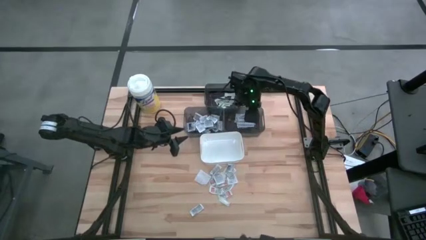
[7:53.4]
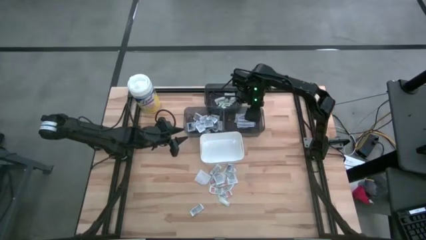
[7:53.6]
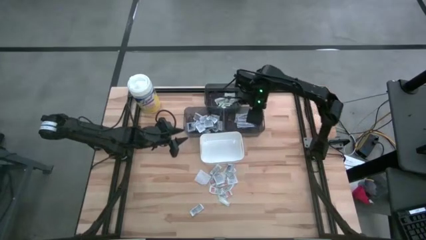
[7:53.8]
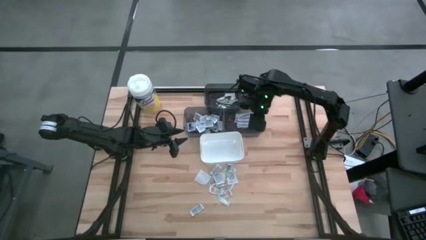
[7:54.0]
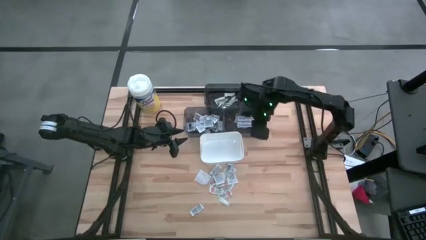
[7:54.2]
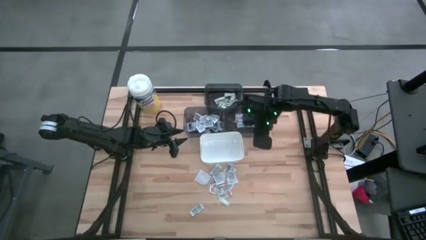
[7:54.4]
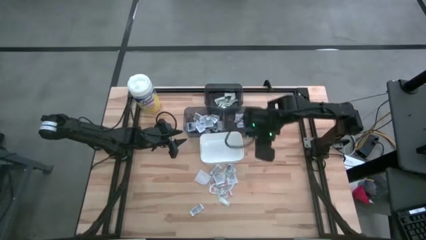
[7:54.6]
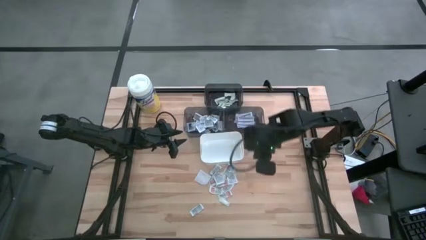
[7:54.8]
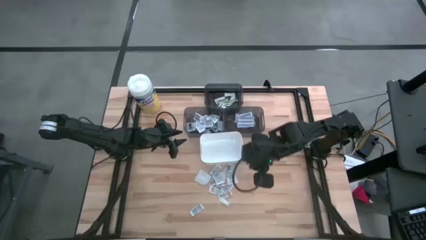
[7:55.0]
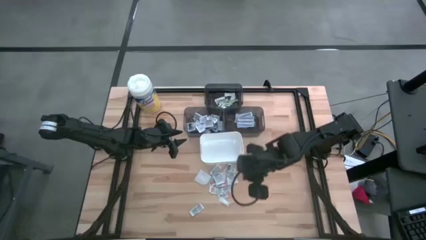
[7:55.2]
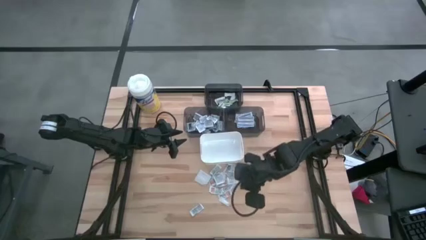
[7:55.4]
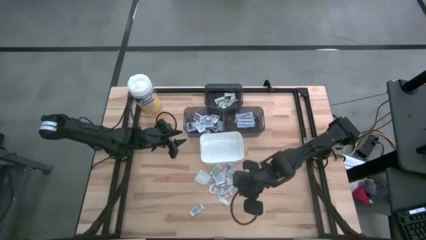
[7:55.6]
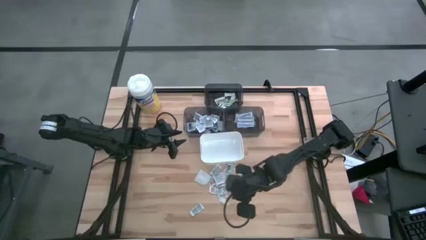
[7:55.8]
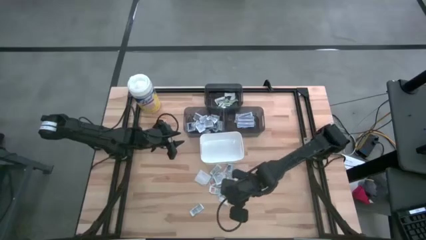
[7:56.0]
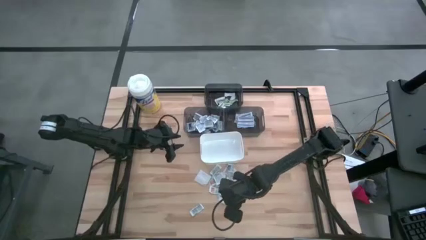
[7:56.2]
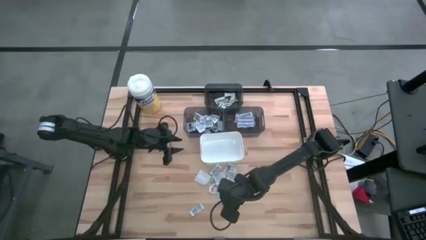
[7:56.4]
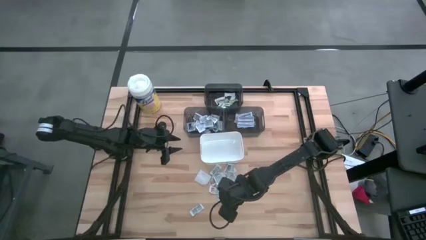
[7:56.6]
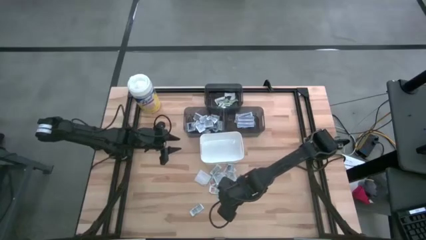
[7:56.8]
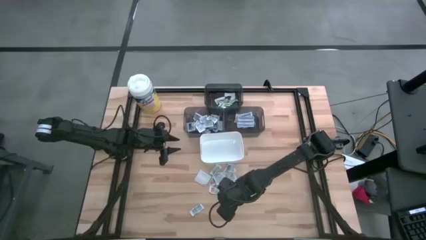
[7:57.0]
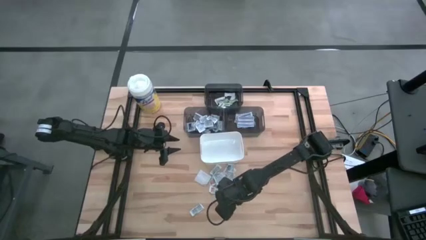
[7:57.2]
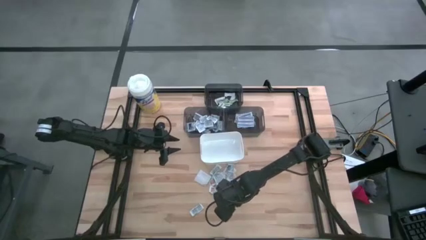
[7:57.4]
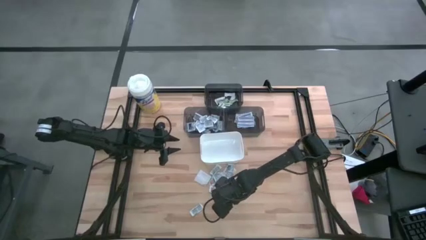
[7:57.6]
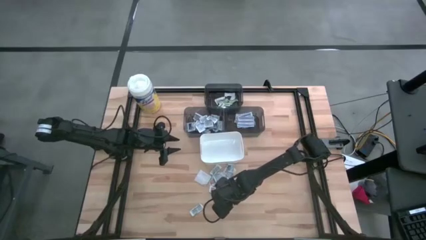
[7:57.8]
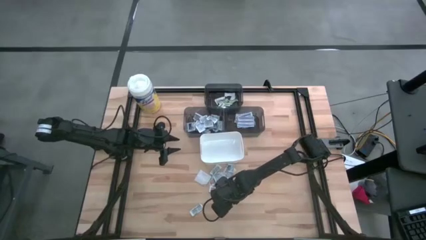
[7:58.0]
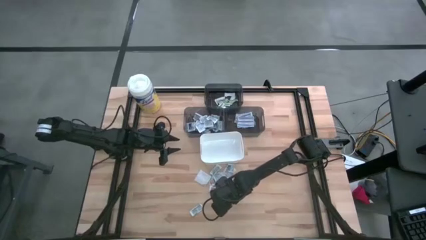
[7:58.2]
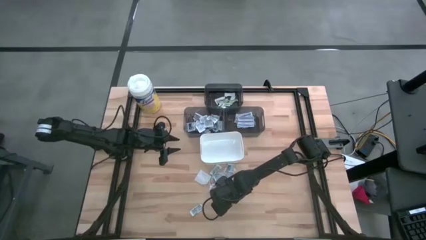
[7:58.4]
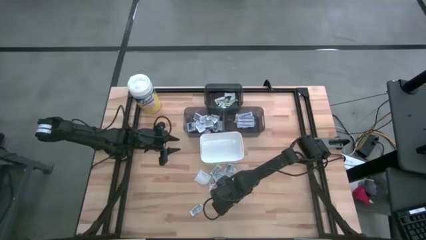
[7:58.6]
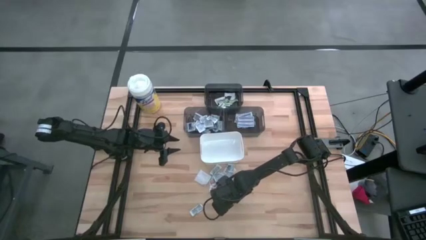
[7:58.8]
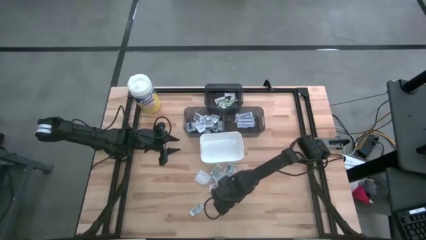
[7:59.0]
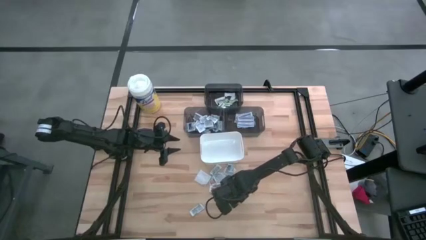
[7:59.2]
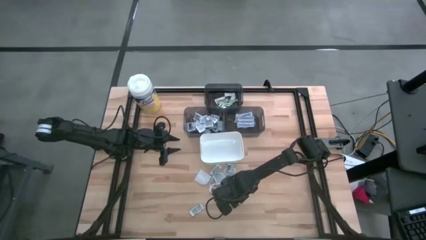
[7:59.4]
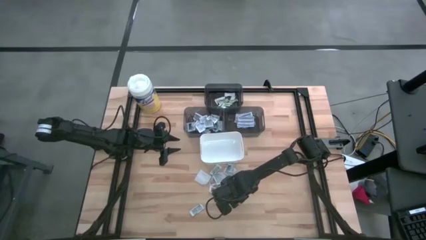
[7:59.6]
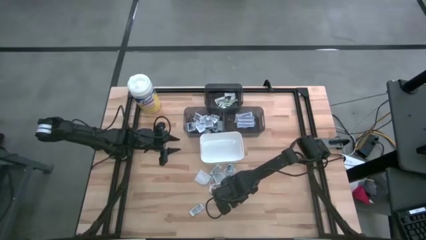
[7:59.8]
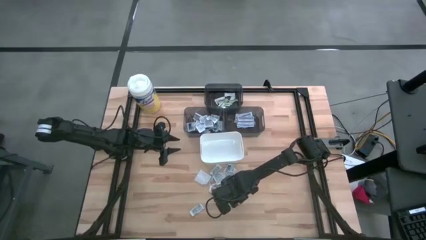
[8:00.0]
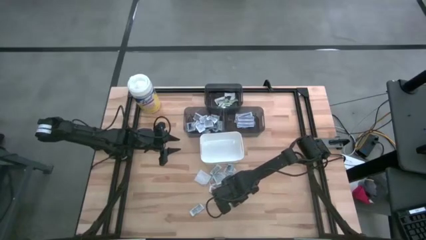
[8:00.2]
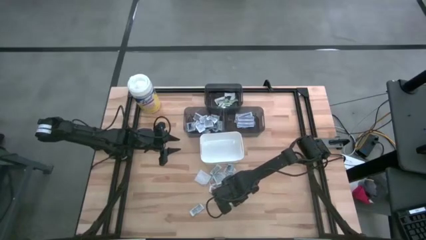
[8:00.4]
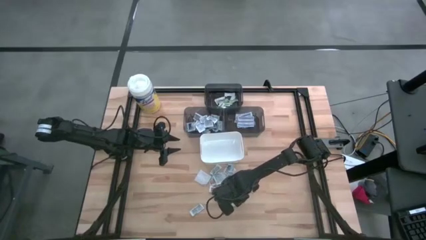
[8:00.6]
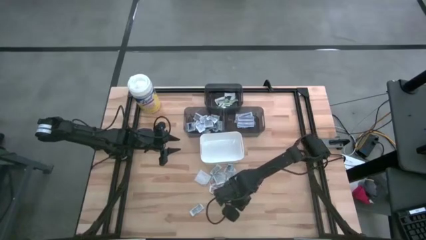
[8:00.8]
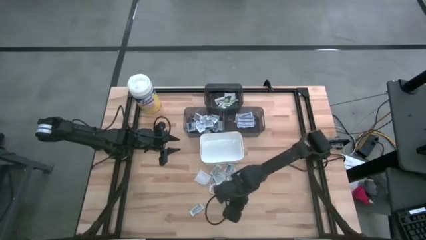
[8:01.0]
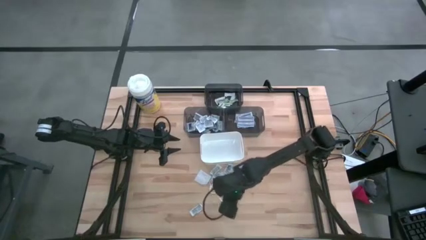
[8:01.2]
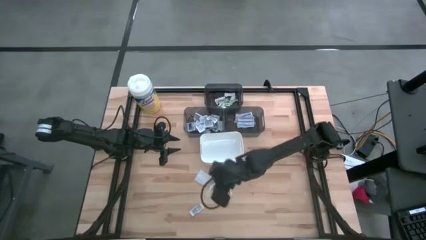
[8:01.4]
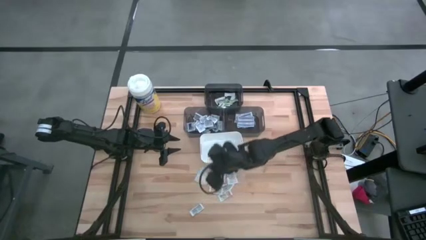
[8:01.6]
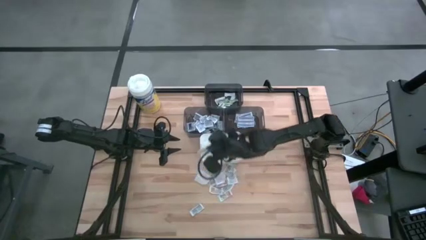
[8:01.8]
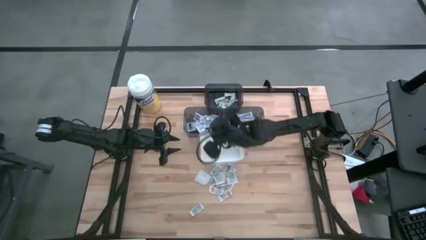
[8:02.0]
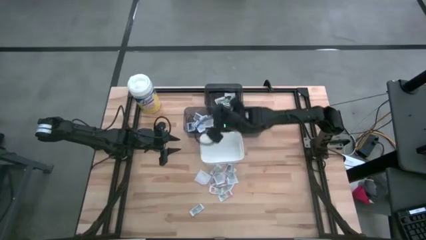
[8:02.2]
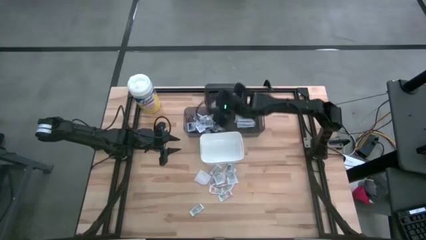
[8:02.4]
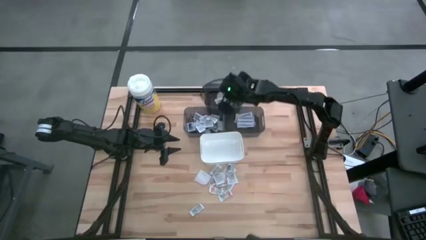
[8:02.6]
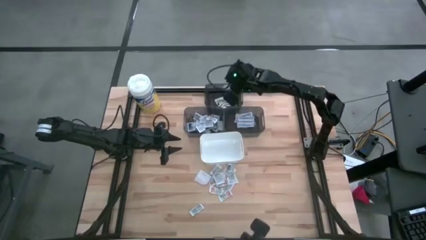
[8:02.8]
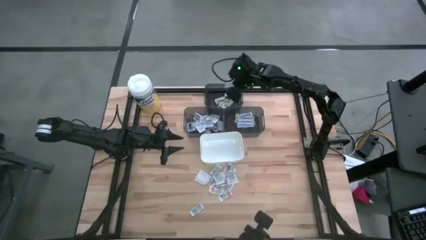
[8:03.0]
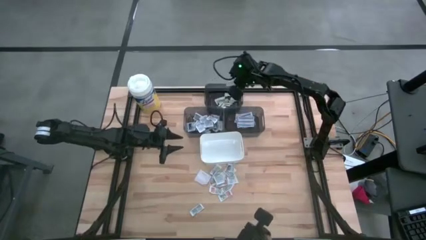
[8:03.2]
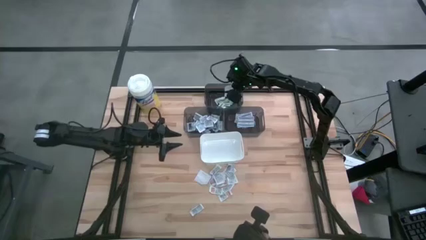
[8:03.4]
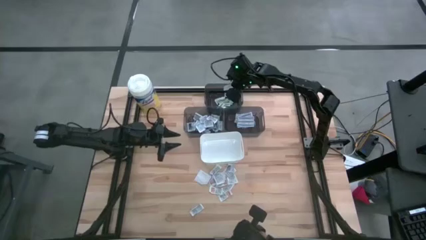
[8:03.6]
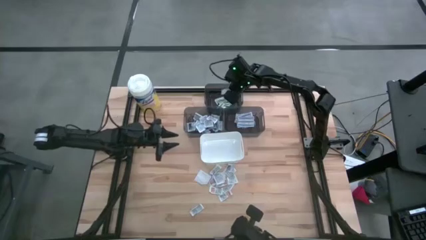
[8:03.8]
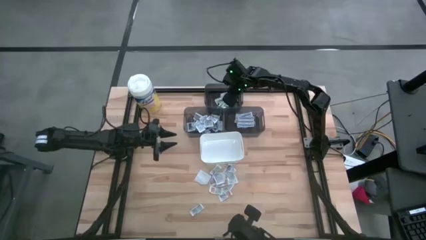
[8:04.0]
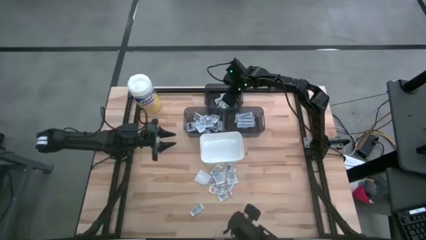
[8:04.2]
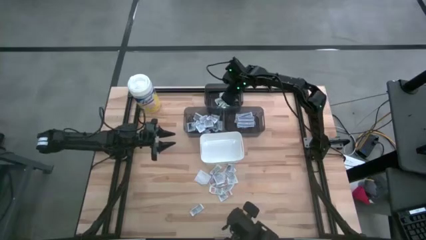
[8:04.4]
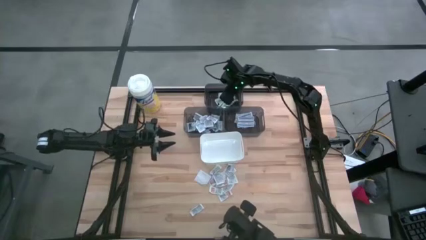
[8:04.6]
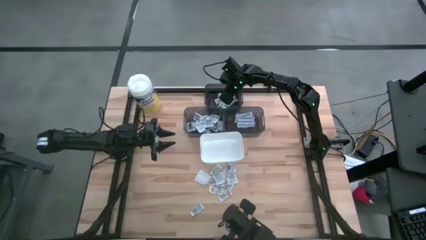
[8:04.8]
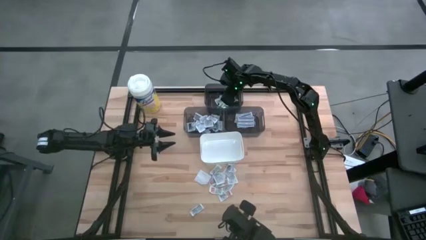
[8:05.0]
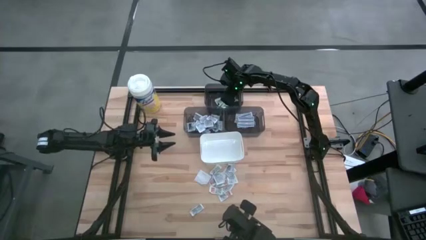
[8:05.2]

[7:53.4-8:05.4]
Task: Pick & Place First Aid Supplies
Put the green bandage into the top black bin

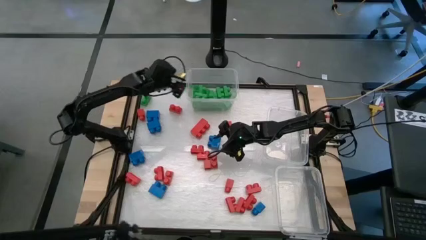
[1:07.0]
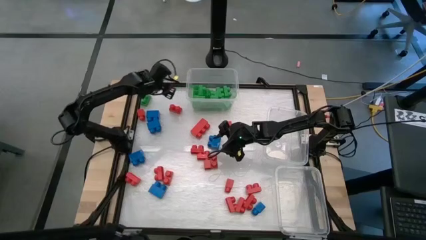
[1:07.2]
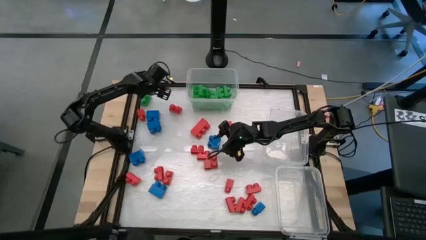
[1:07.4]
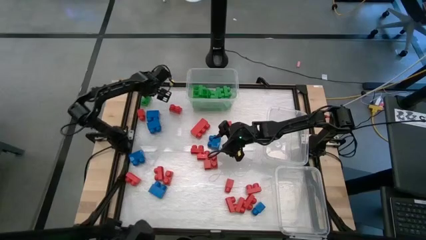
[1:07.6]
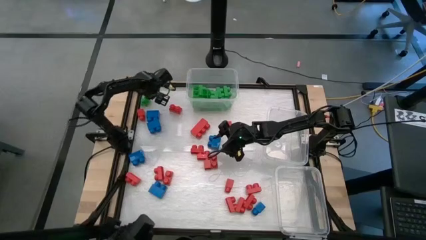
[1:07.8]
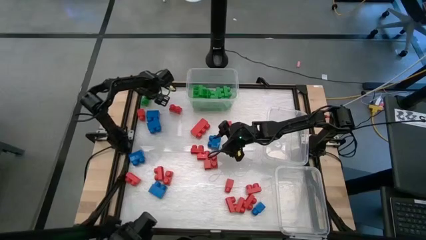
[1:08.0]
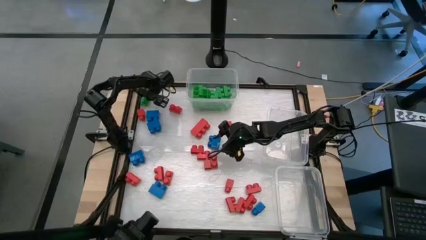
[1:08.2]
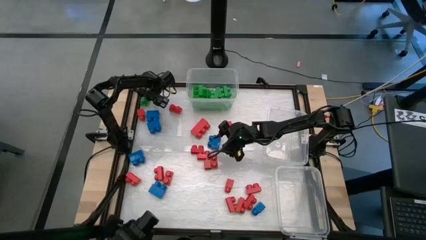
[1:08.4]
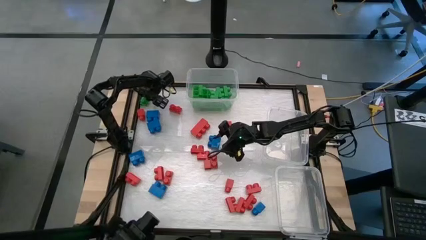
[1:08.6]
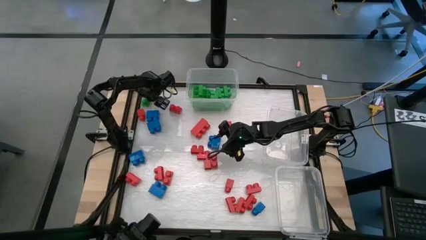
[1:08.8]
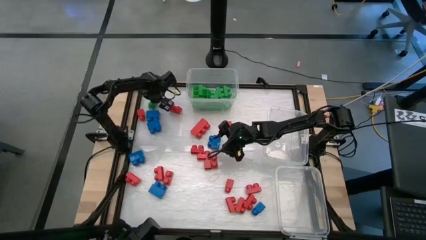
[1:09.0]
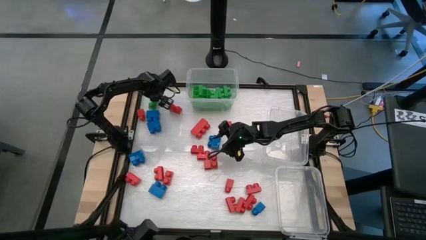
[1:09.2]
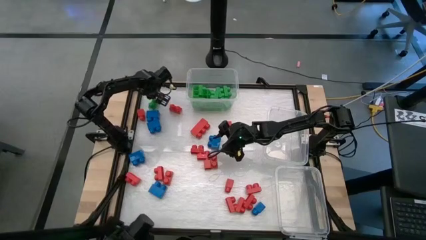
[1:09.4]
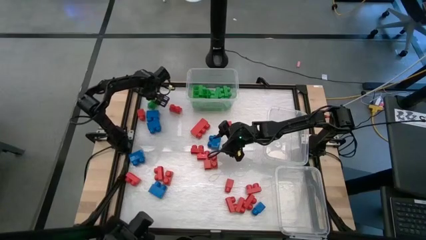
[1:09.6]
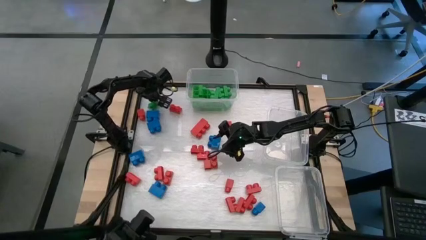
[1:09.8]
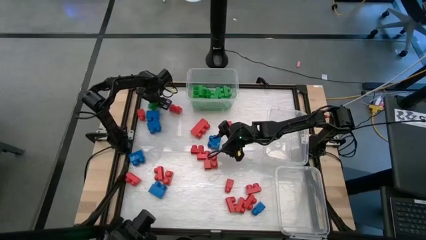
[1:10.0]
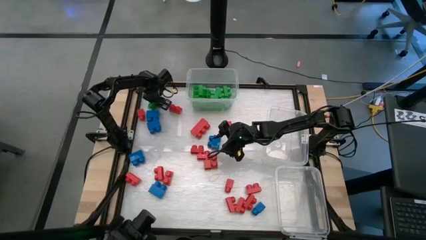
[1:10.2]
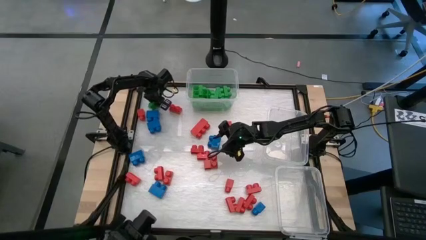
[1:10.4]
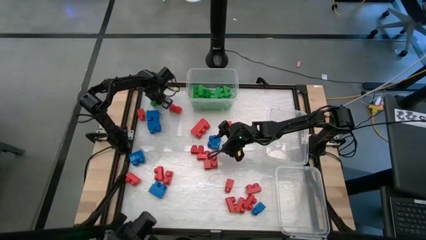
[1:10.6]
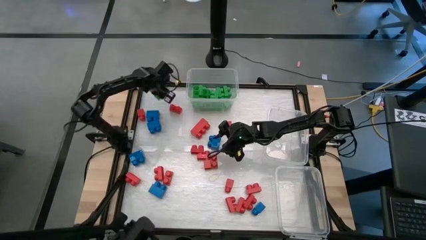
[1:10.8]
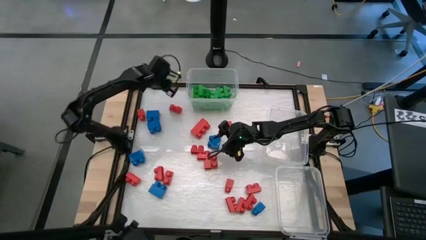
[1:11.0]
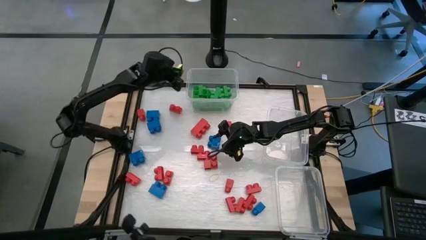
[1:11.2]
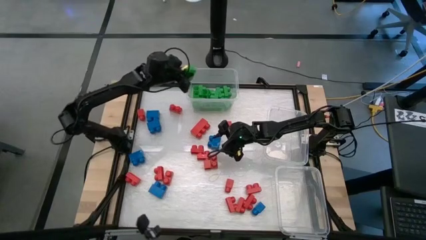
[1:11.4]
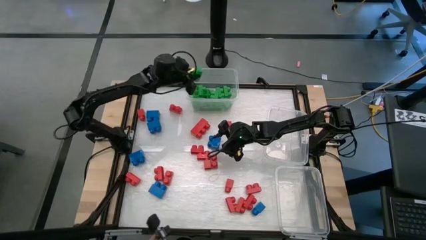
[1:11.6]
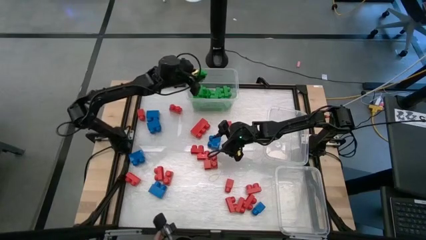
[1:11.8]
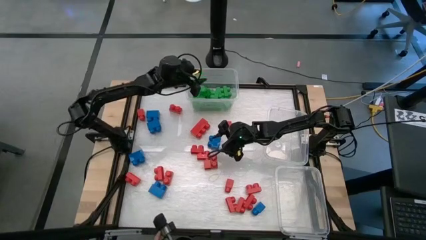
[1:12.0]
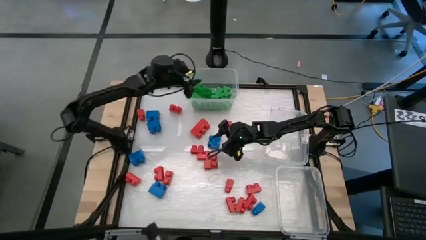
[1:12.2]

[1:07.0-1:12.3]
Task: Sort blocks
Put the green game piece into the top transparent bin
